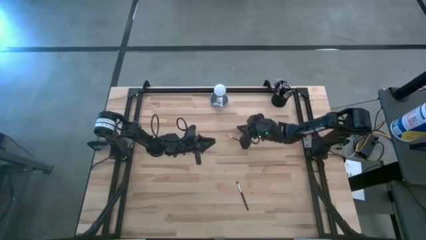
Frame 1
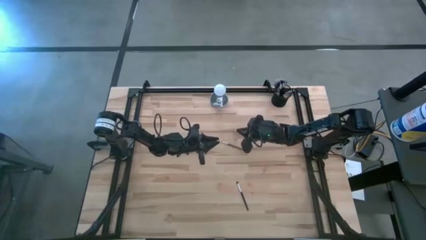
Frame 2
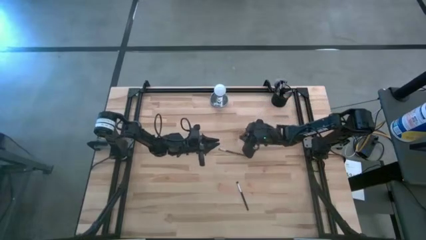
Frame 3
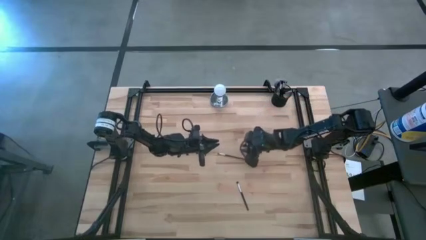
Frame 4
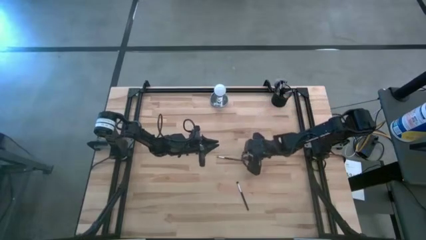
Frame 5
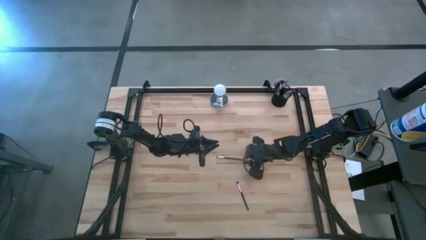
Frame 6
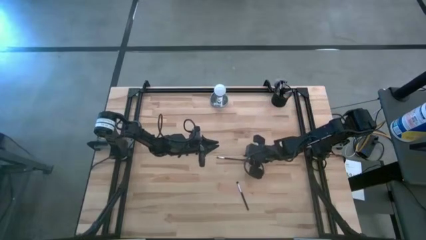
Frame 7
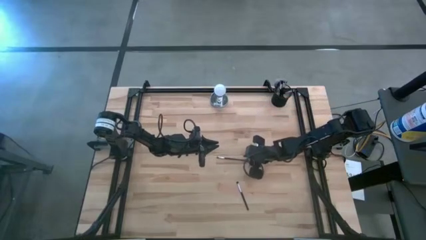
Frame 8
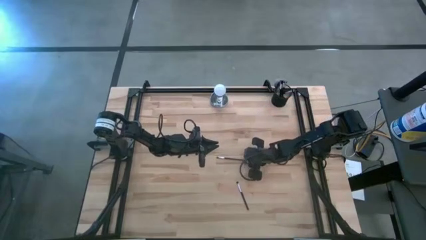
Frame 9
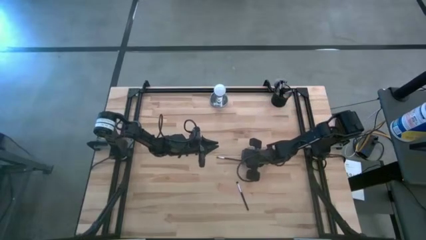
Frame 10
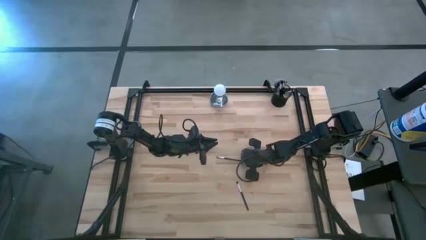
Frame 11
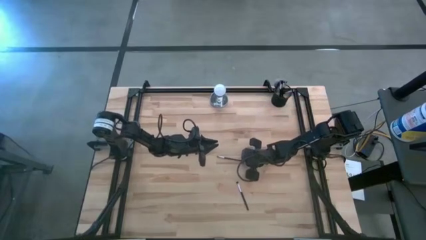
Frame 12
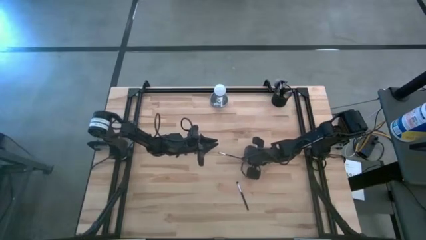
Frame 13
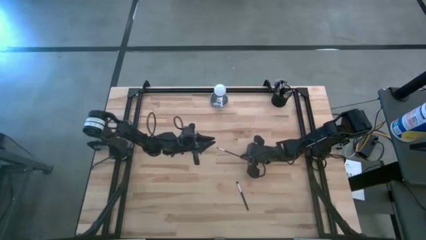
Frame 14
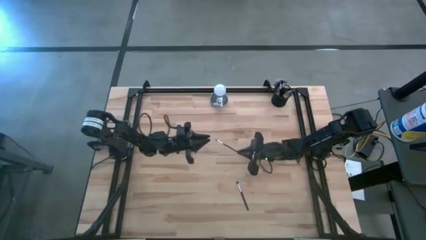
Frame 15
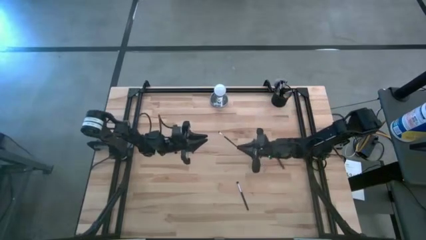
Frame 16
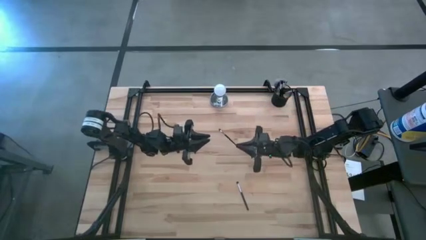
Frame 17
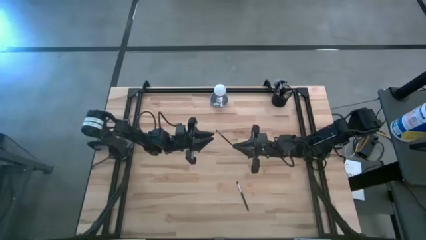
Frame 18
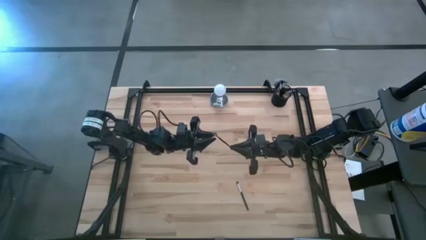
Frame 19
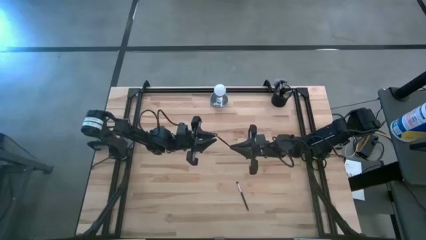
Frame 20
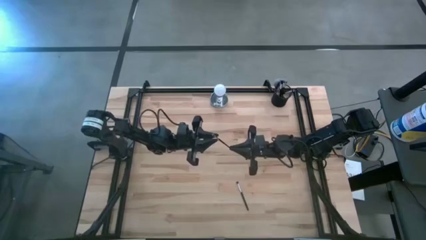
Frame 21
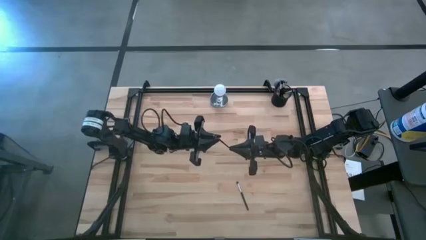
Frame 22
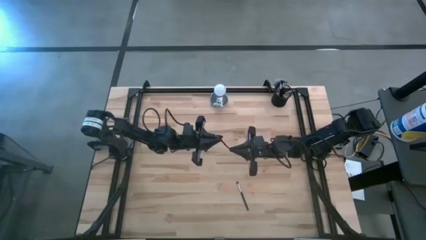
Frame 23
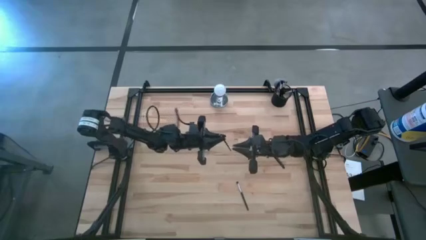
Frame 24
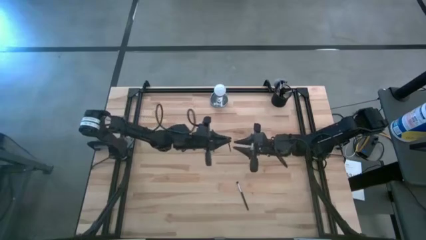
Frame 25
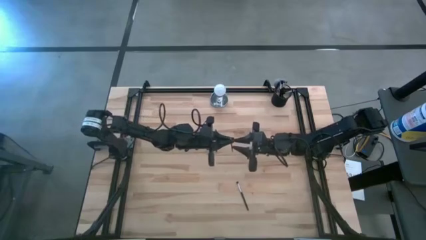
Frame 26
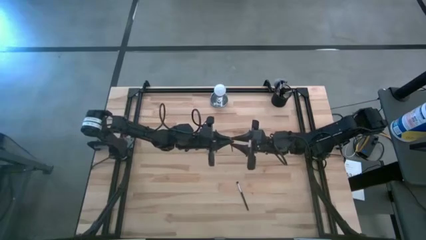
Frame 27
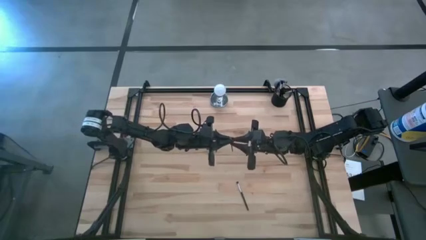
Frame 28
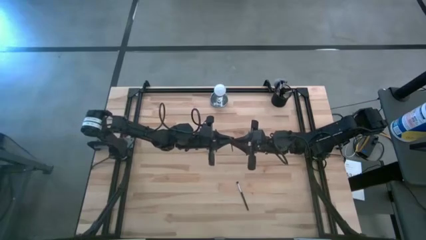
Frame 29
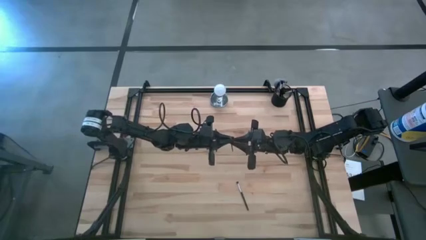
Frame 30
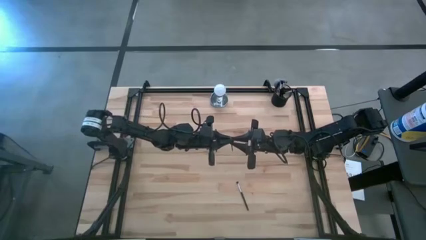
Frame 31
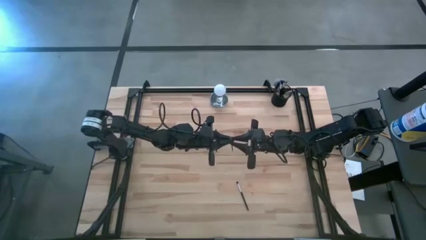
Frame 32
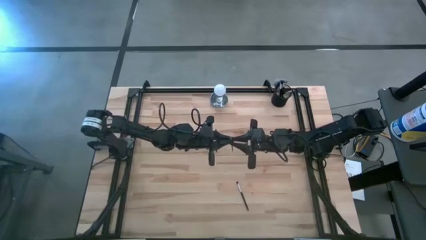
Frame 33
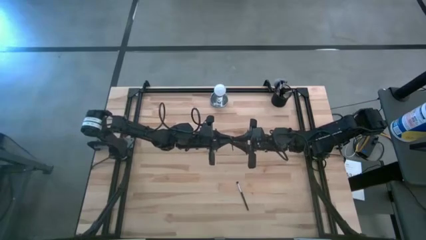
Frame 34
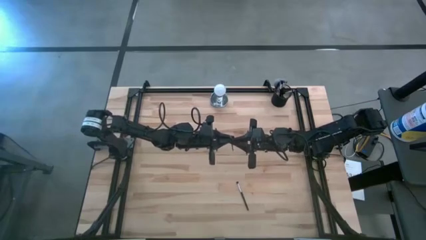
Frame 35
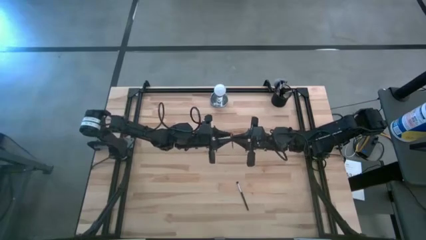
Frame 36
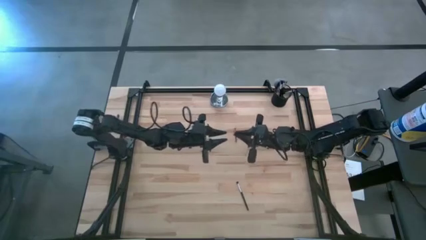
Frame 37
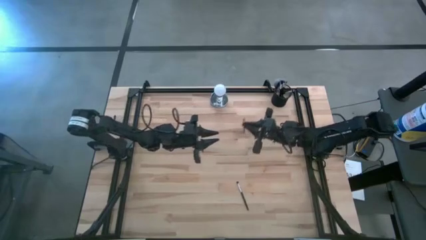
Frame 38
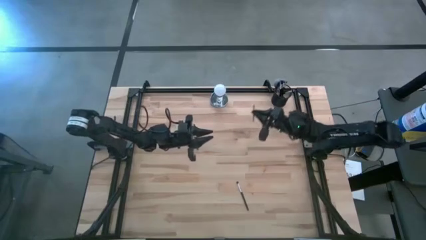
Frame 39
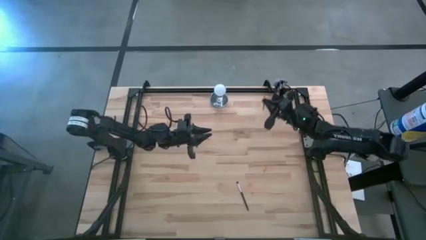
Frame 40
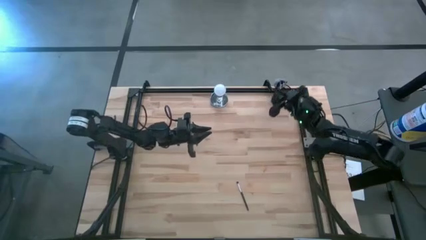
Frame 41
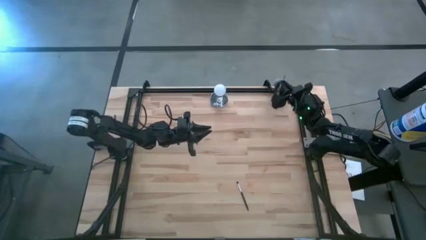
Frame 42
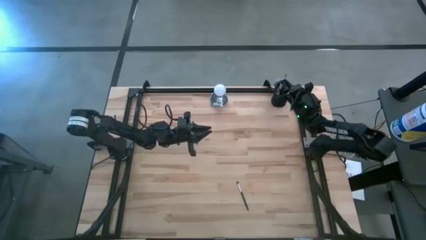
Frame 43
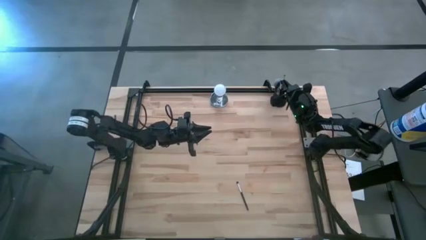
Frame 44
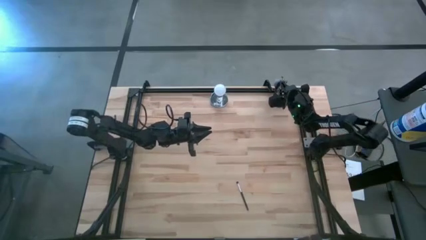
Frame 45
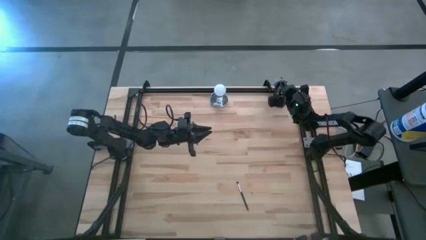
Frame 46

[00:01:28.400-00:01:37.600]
Task: Pick & Place Makeup Supplies
Put the makeup brush into the makeup holder

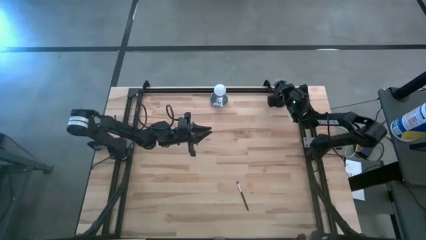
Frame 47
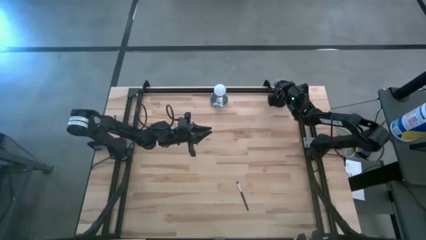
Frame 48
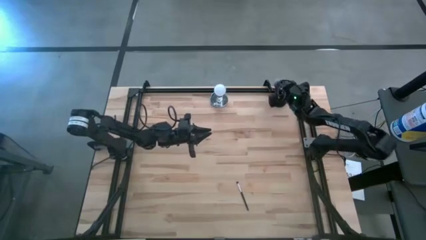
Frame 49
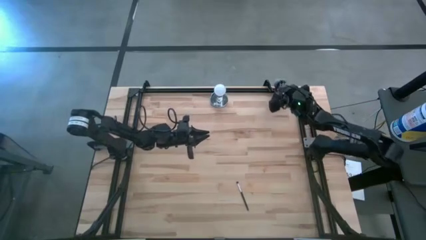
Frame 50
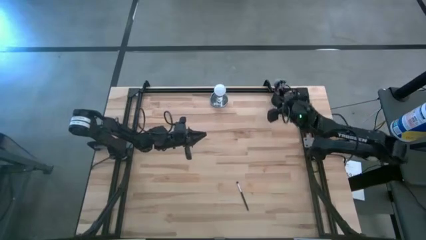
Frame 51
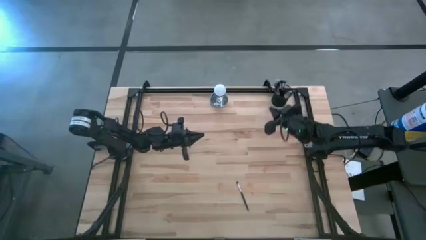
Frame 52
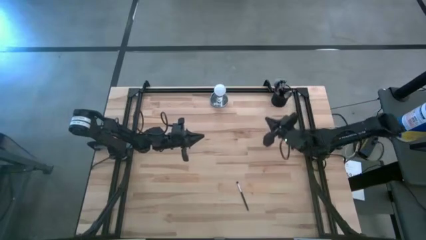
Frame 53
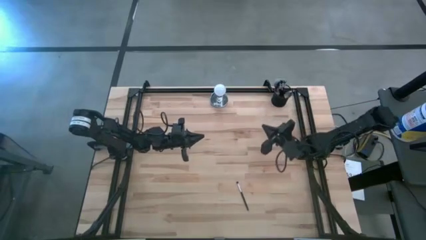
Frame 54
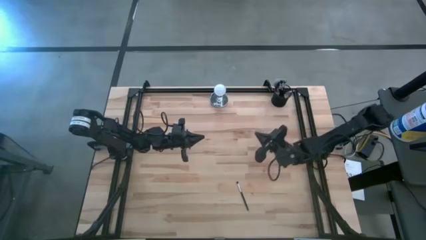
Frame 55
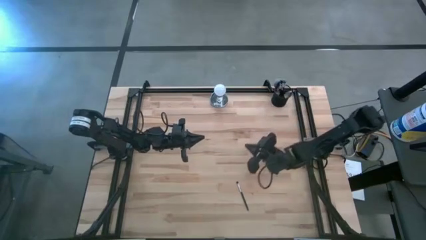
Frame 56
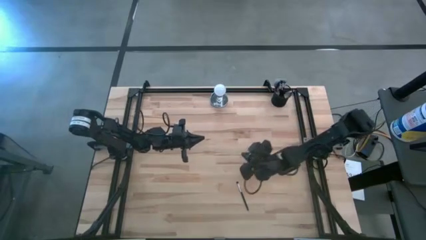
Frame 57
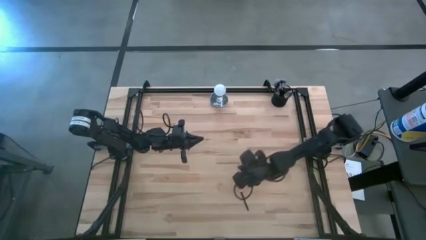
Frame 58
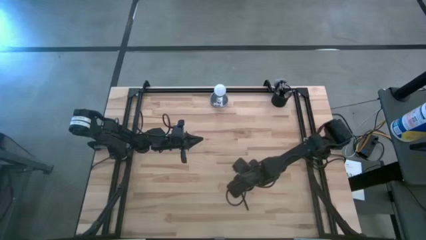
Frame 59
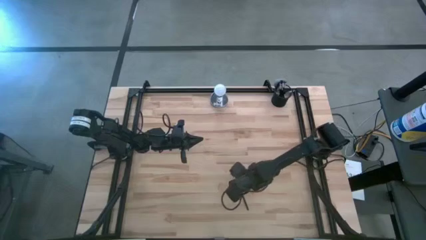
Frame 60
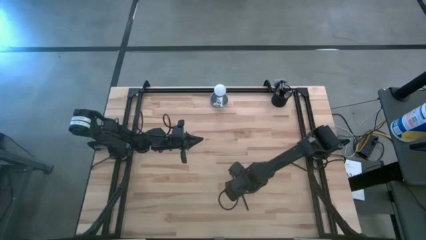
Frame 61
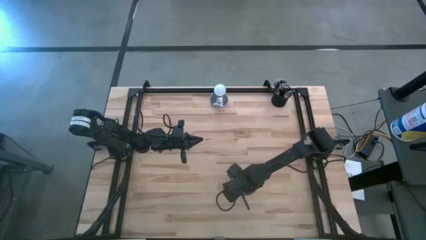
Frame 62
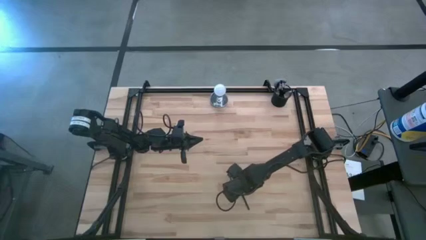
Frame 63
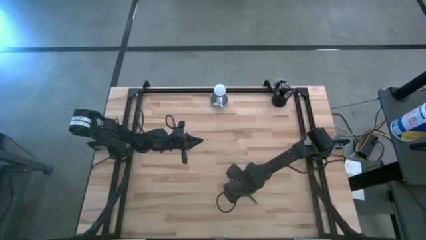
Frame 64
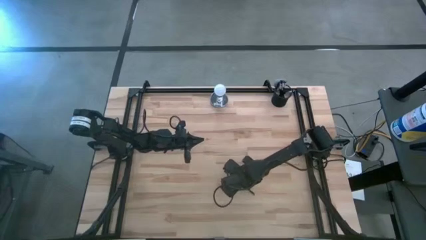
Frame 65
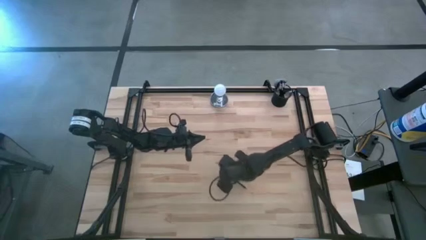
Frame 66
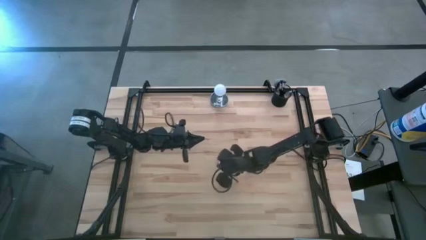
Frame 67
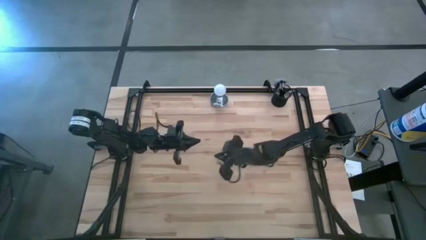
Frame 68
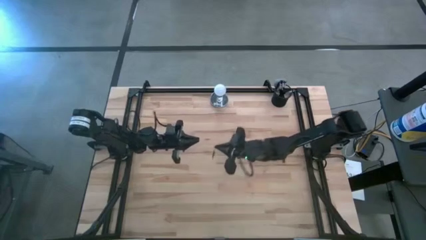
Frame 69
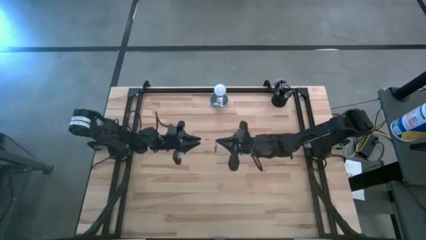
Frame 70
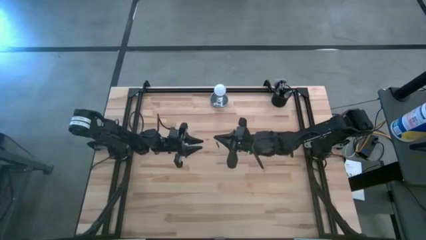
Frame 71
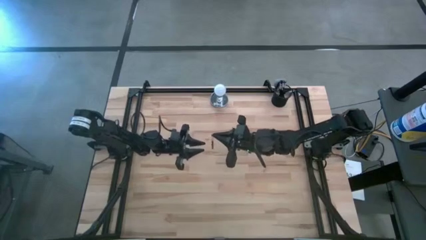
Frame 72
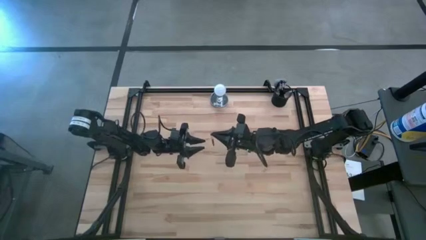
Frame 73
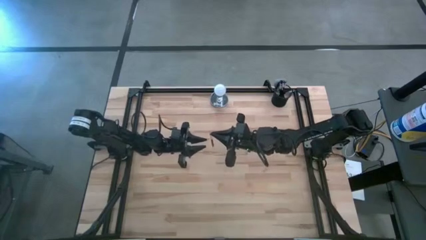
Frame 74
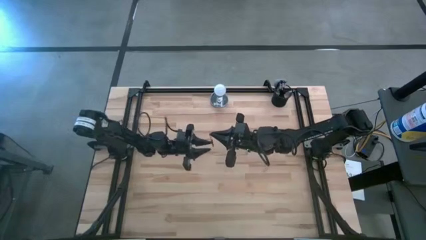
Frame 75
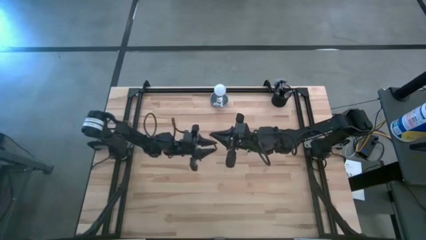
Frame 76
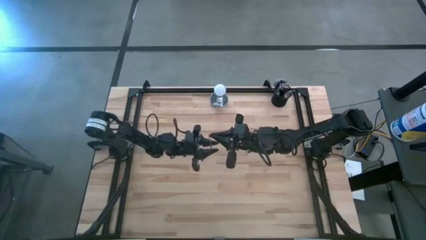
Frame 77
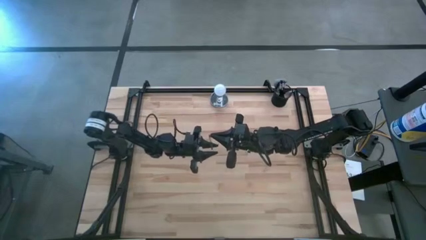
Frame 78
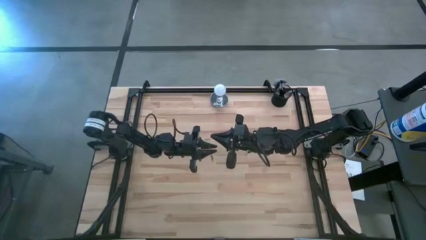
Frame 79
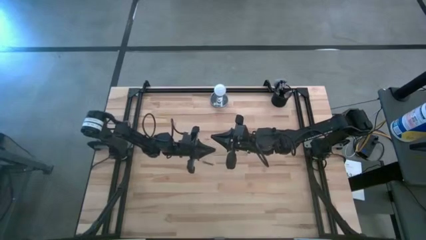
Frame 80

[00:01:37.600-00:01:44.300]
Put the makeup brush into the makeup holder
